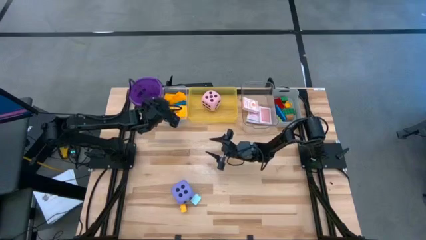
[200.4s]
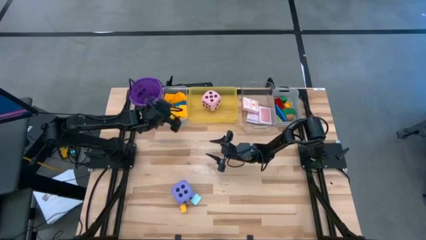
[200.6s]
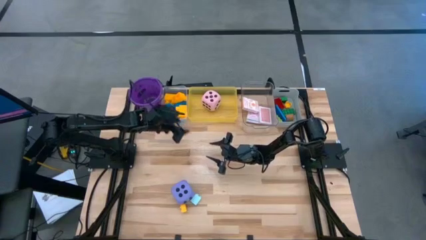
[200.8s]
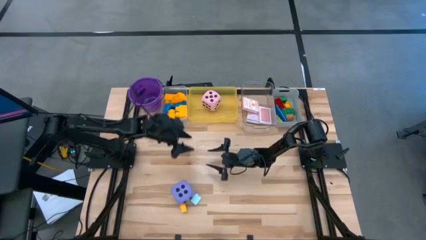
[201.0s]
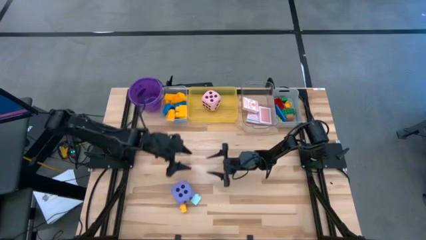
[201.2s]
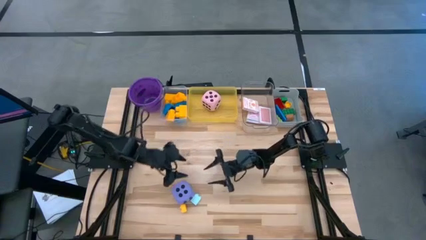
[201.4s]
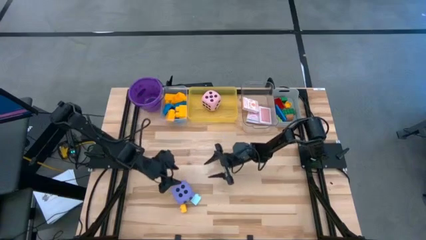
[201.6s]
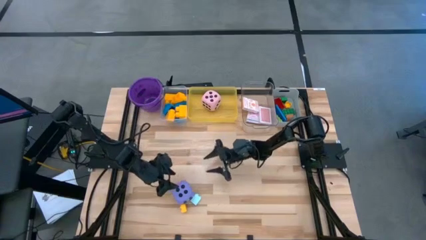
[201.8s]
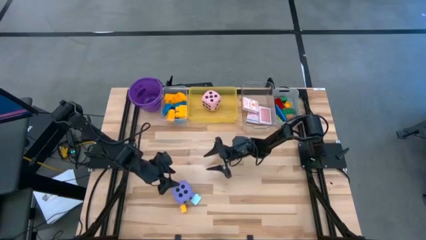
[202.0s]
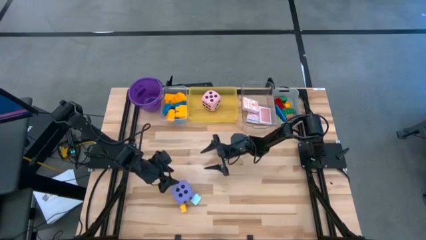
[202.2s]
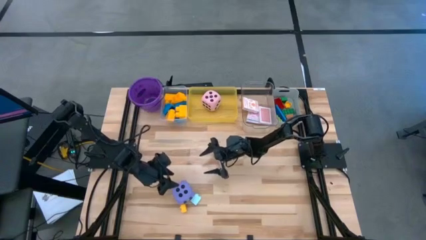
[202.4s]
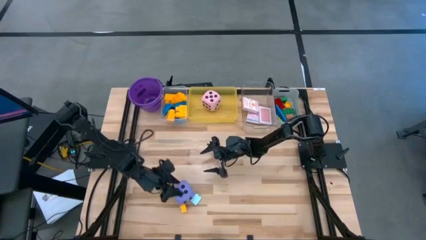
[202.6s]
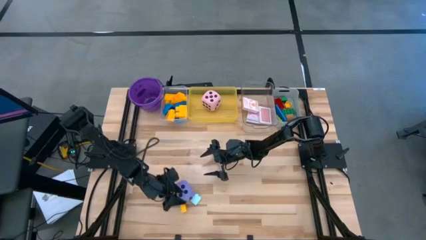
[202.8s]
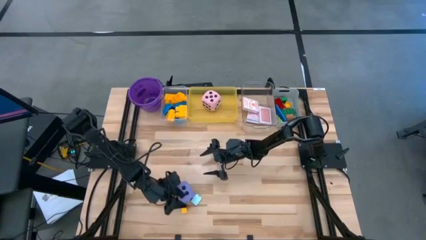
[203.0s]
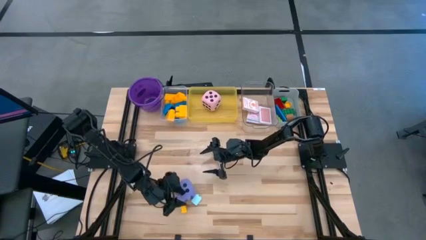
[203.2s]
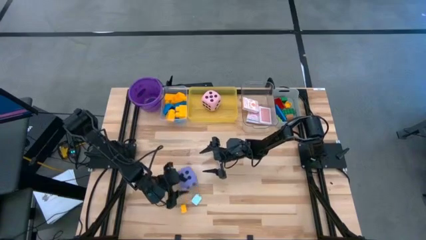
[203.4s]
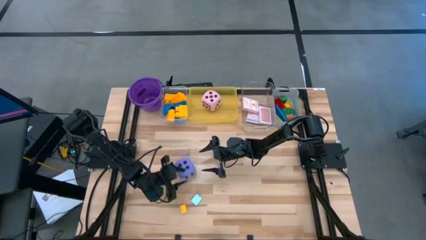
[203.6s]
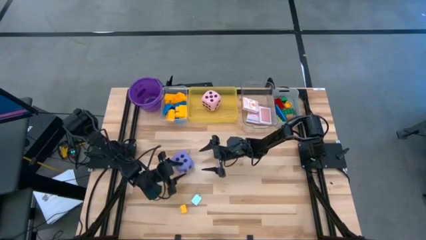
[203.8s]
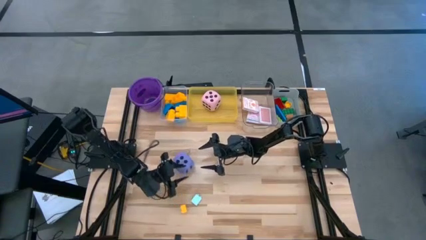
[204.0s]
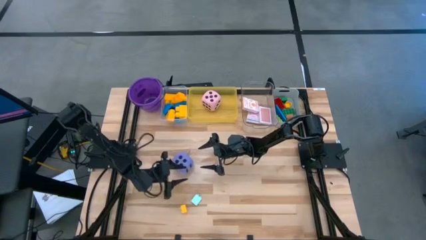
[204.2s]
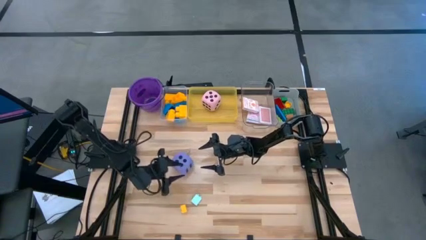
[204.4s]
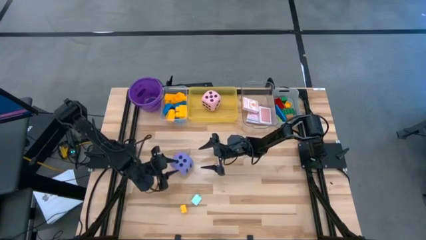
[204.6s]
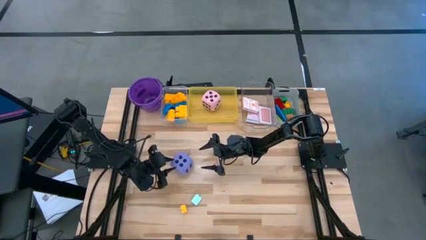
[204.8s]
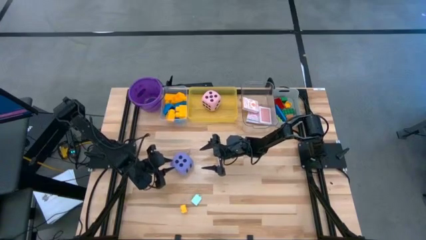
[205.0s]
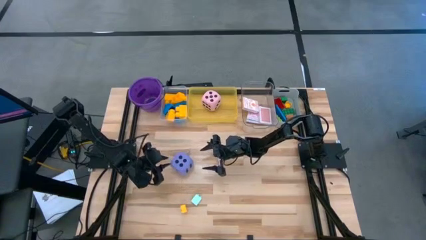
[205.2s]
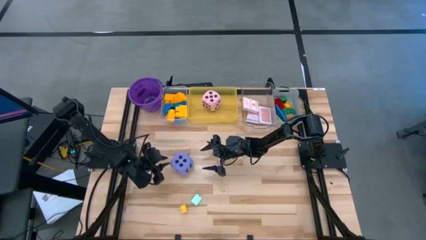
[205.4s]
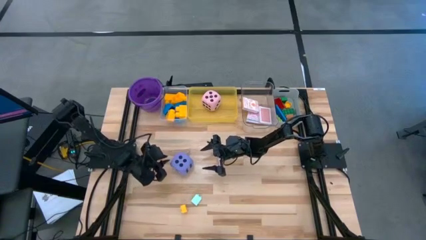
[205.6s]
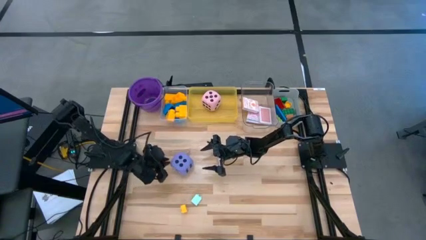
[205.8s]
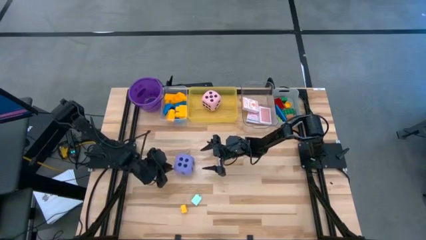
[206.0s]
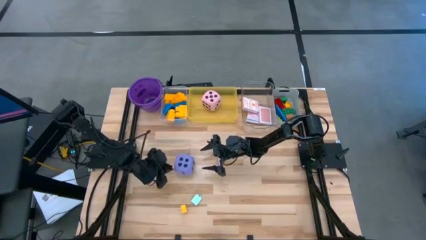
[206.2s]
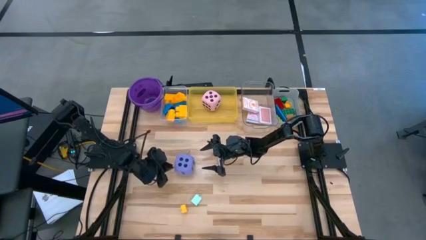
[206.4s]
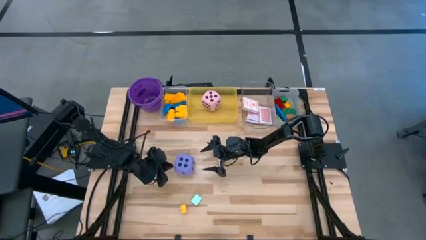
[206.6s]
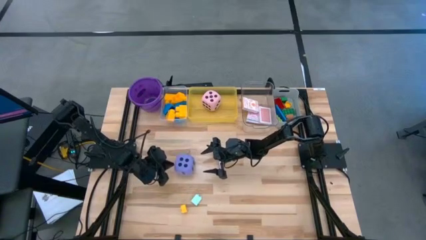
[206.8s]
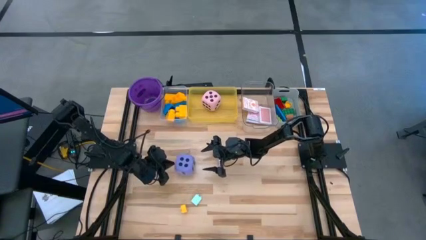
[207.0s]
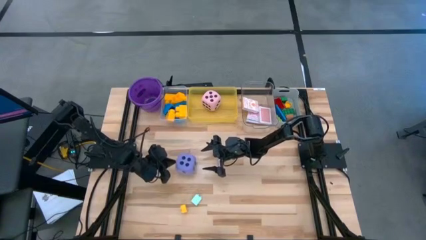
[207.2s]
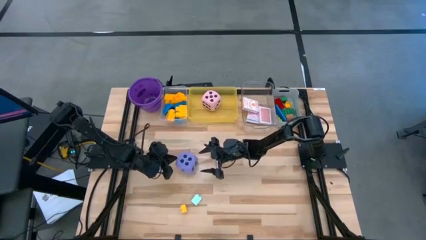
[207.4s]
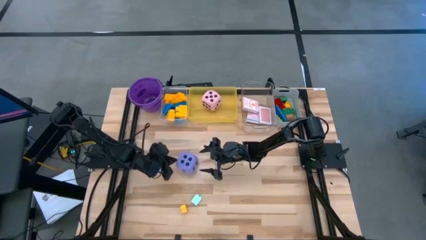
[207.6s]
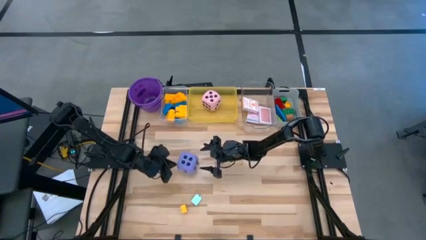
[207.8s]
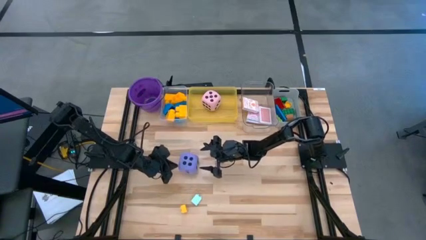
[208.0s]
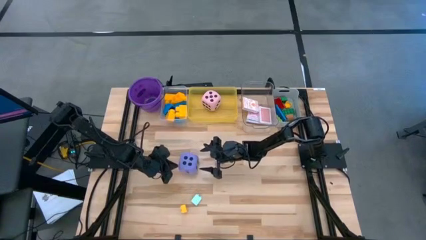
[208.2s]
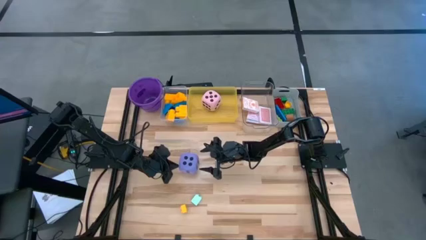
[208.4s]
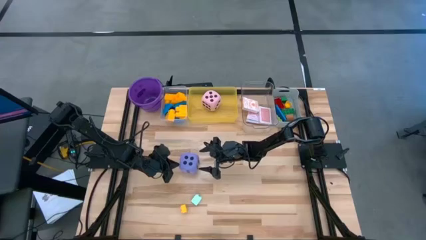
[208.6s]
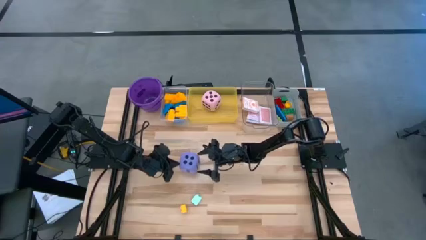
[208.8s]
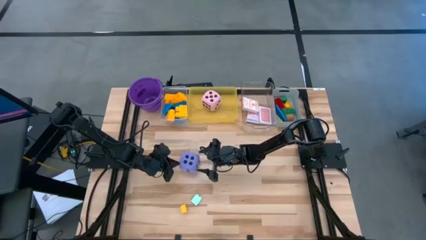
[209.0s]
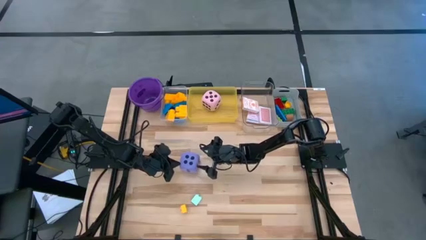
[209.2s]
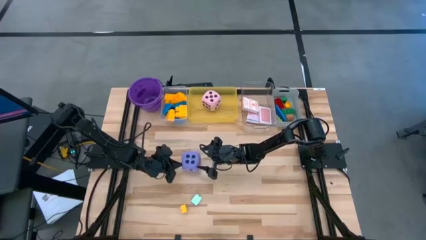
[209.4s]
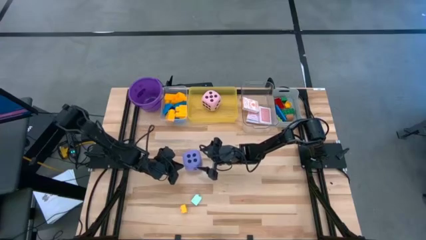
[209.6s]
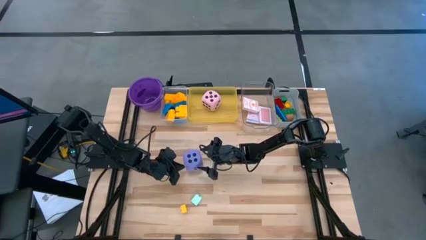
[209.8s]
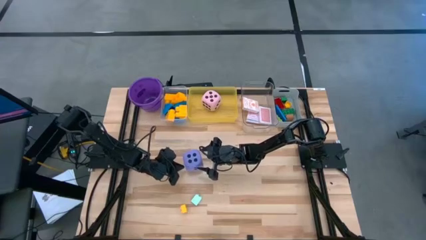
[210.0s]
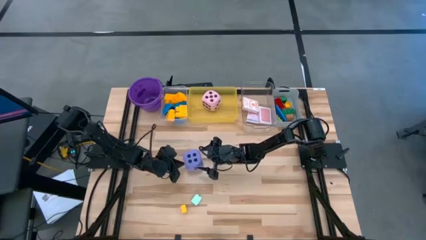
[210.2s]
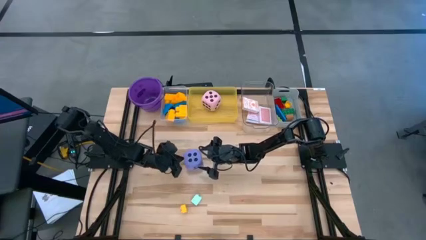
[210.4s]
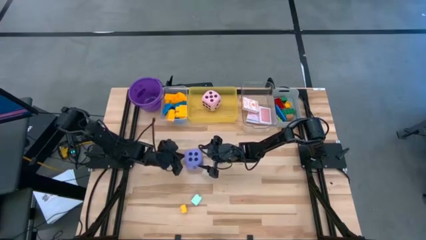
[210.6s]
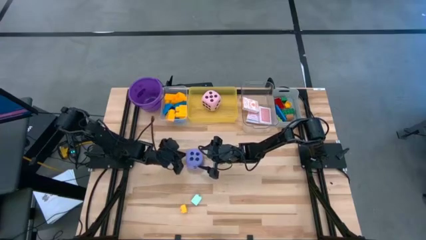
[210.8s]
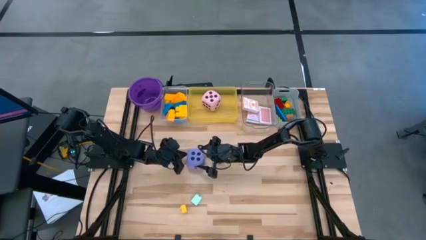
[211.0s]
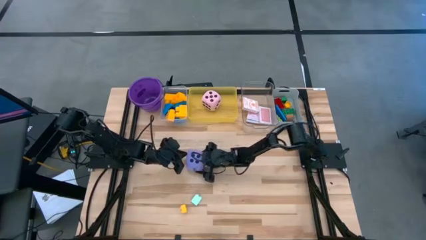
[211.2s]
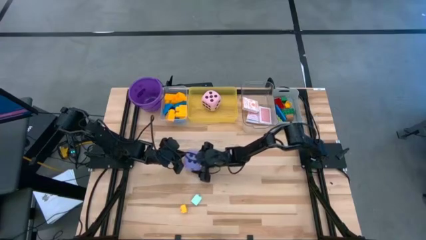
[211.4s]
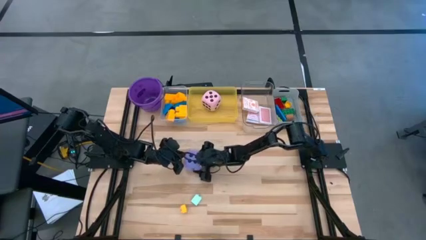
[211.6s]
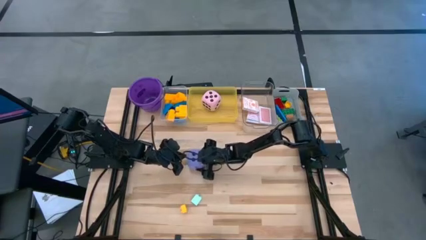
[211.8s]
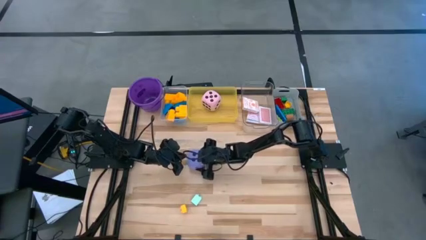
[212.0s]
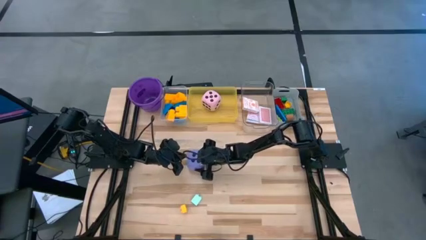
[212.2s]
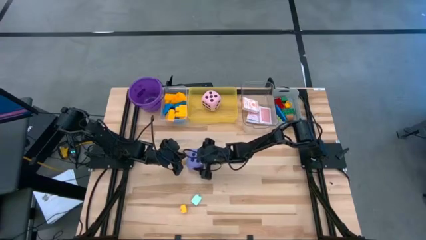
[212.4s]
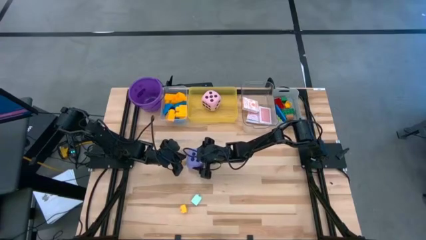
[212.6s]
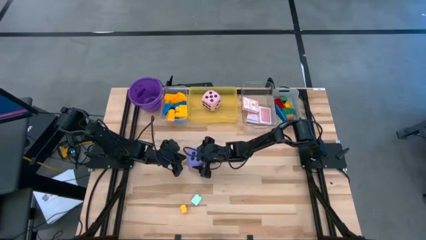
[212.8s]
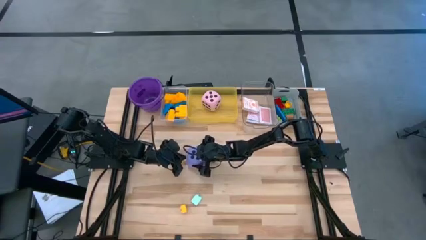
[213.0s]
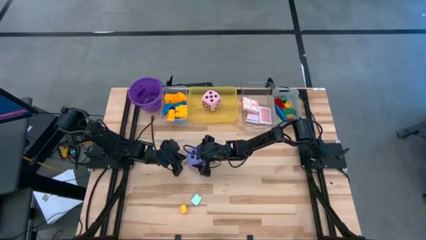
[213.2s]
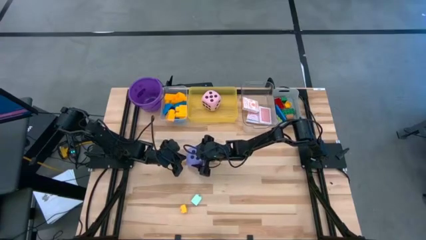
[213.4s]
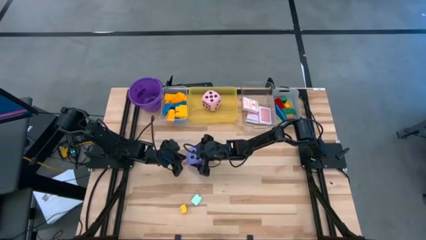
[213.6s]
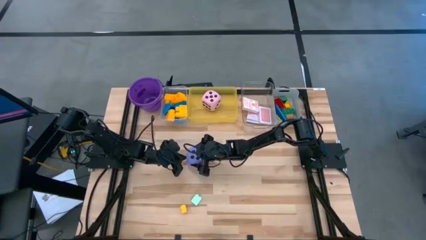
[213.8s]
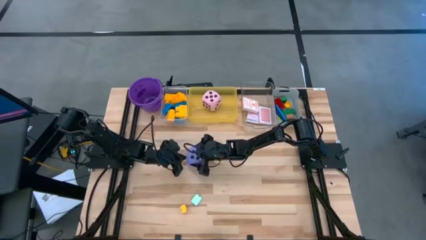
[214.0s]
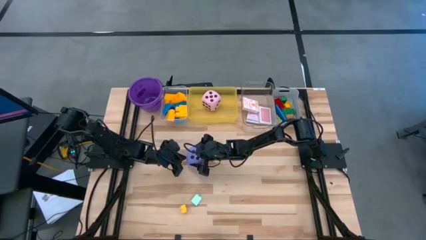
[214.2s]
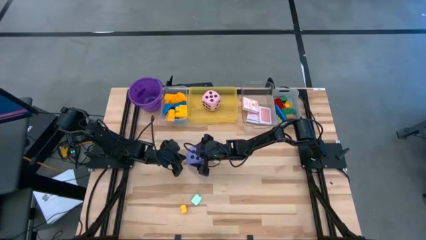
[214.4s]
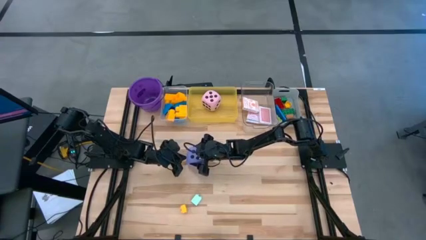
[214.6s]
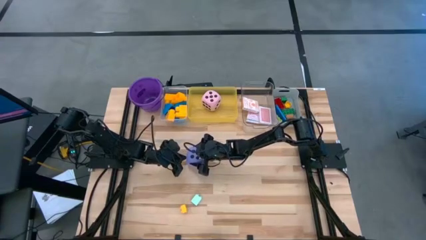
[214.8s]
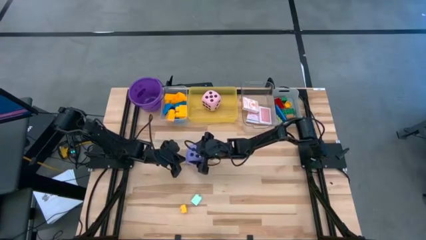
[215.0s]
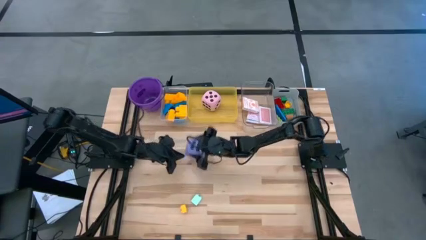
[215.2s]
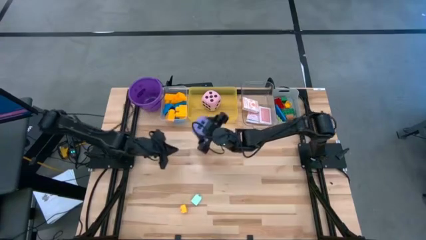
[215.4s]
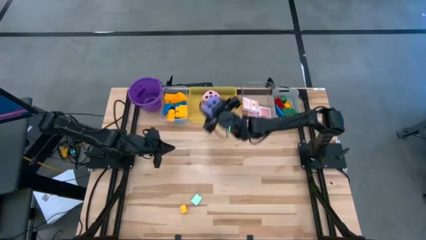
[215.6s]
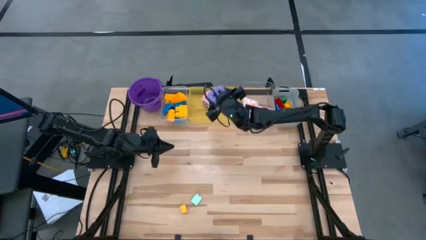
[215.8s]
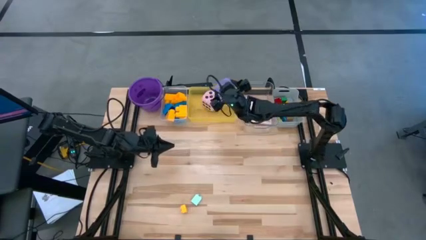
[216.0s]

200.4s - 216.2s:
Task: Pick & Place Toys
Put the violet dice into the yellow transparent bin
